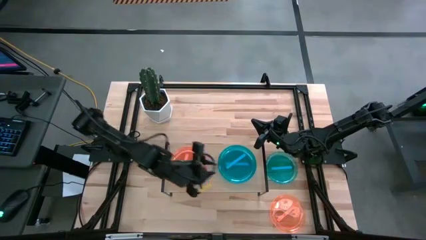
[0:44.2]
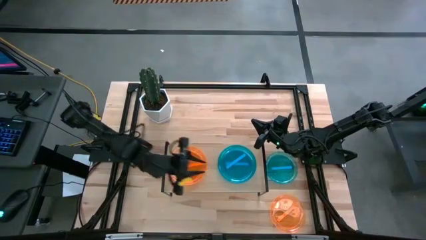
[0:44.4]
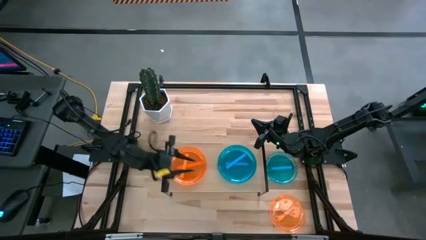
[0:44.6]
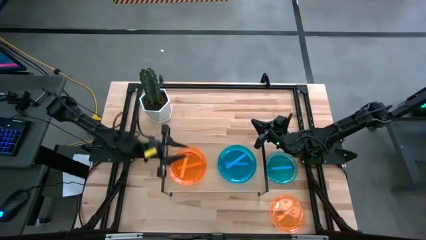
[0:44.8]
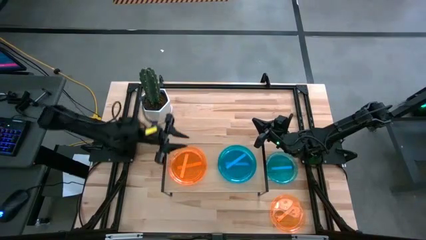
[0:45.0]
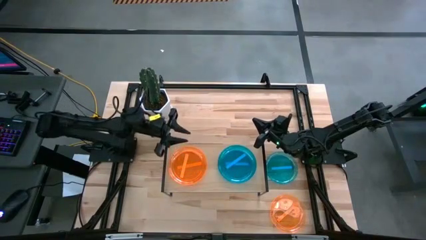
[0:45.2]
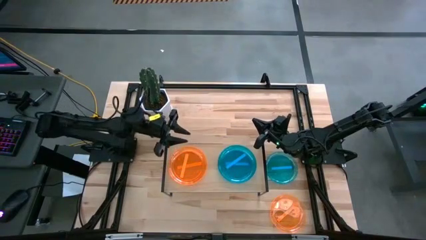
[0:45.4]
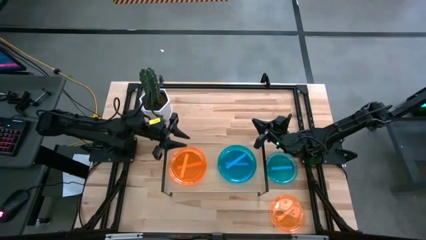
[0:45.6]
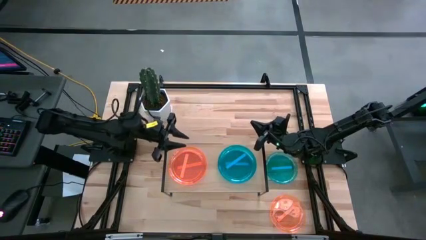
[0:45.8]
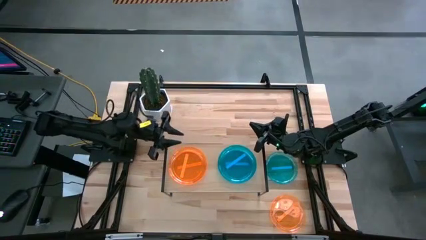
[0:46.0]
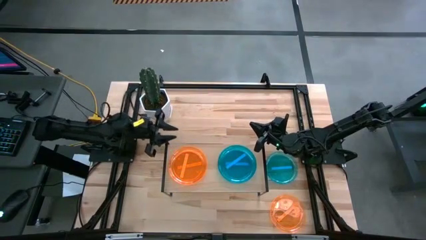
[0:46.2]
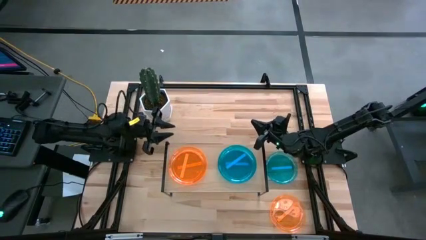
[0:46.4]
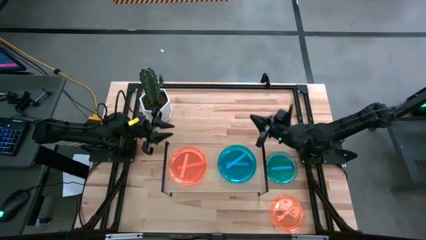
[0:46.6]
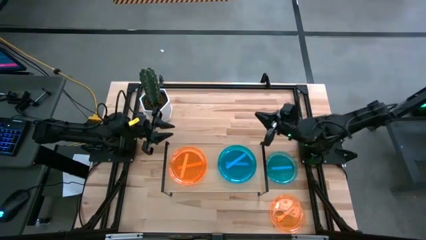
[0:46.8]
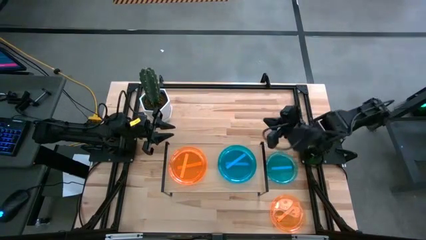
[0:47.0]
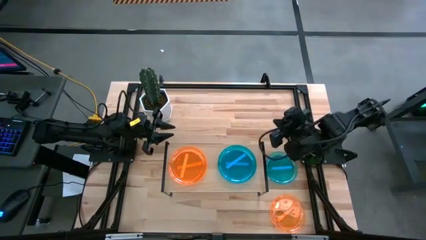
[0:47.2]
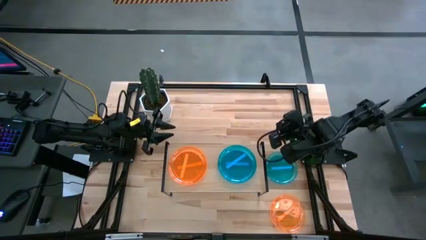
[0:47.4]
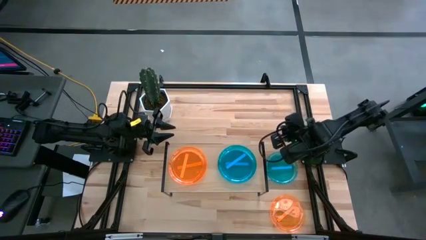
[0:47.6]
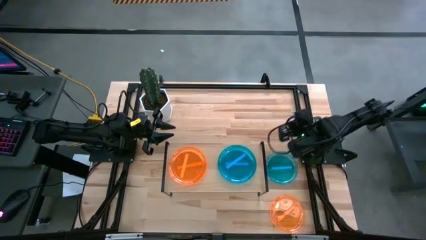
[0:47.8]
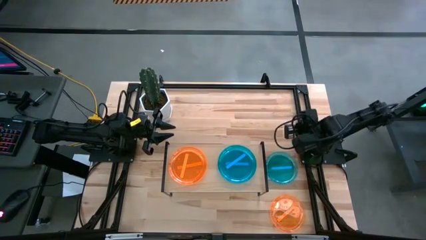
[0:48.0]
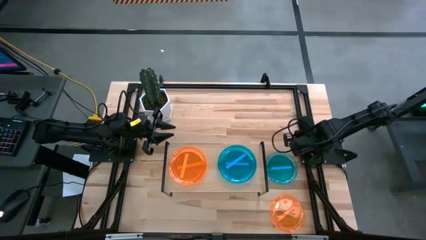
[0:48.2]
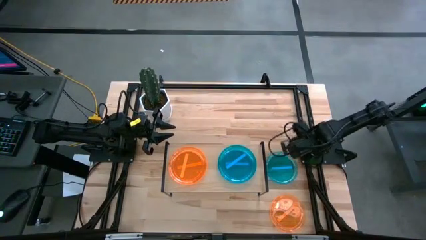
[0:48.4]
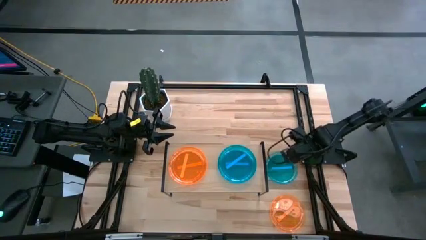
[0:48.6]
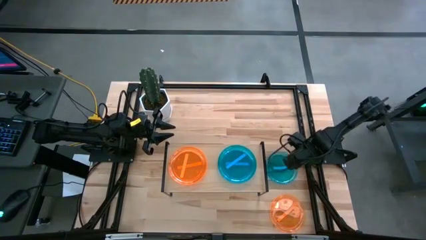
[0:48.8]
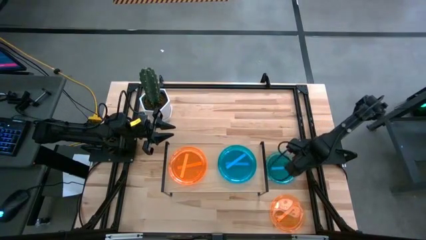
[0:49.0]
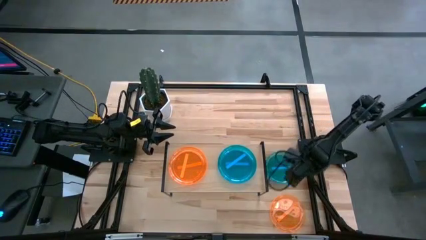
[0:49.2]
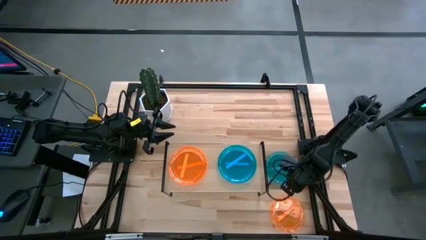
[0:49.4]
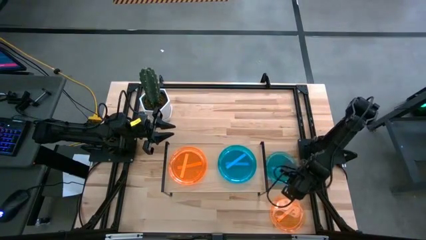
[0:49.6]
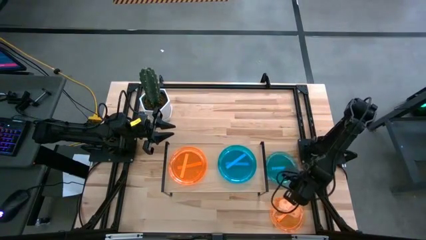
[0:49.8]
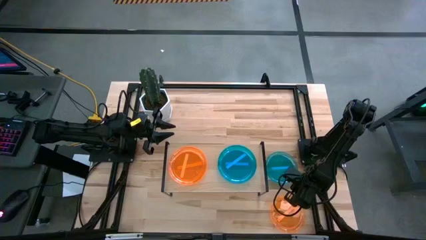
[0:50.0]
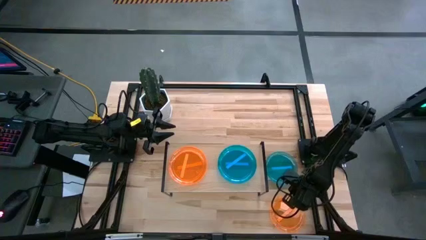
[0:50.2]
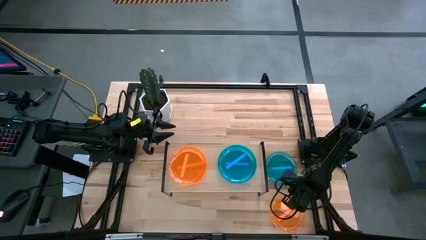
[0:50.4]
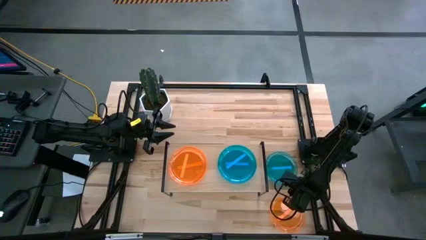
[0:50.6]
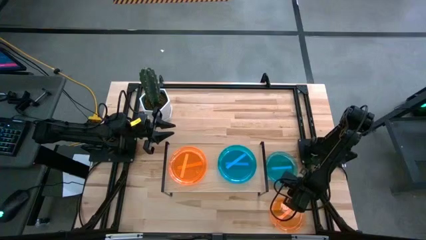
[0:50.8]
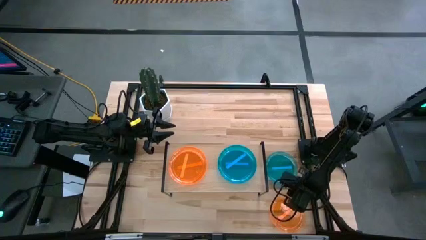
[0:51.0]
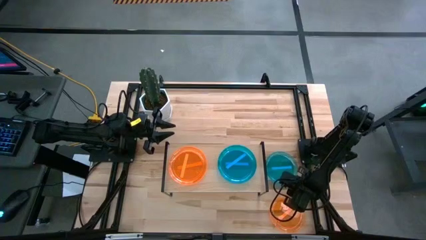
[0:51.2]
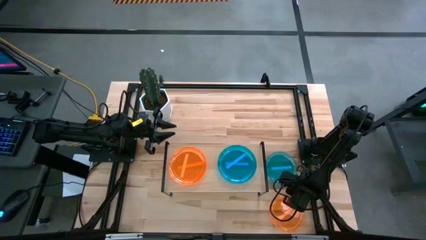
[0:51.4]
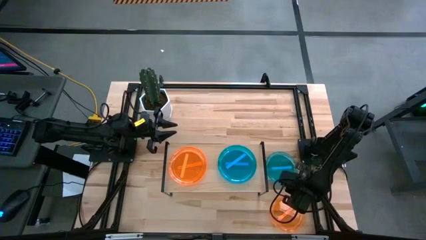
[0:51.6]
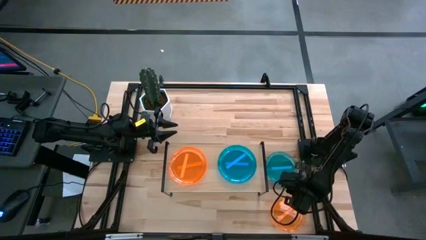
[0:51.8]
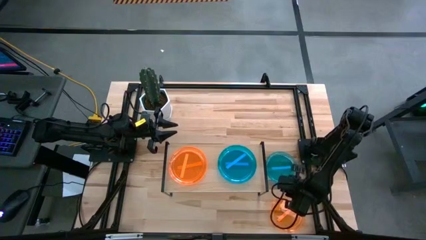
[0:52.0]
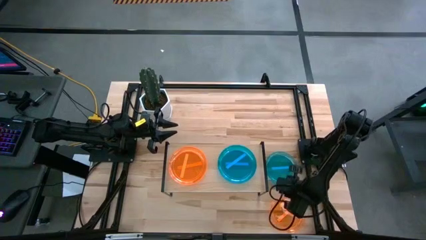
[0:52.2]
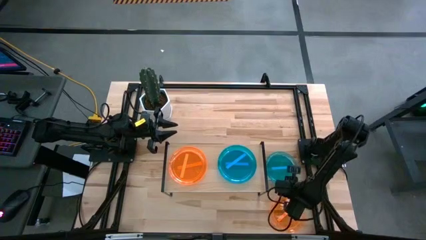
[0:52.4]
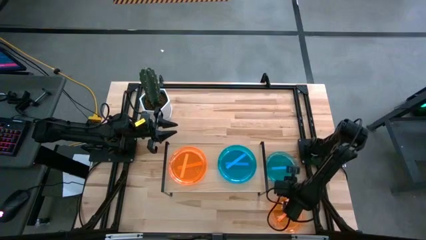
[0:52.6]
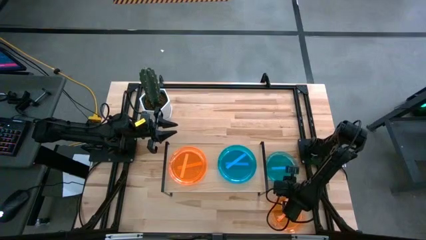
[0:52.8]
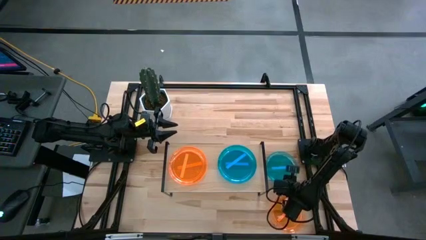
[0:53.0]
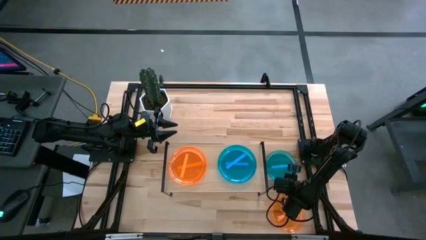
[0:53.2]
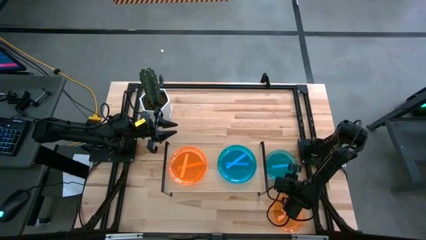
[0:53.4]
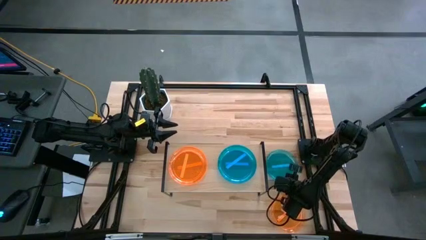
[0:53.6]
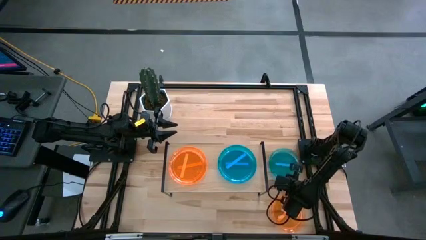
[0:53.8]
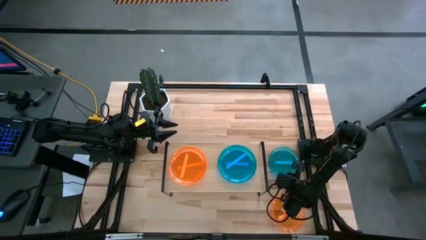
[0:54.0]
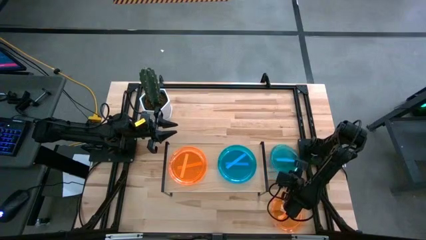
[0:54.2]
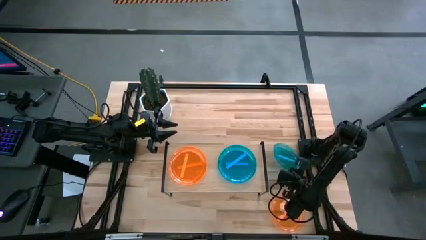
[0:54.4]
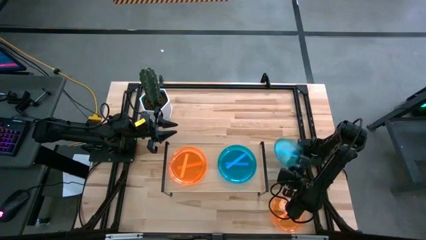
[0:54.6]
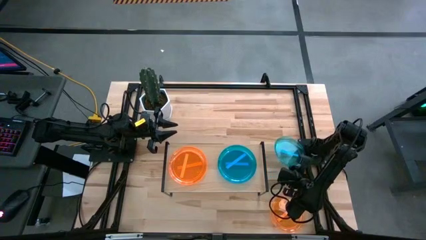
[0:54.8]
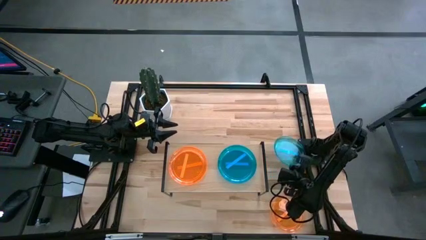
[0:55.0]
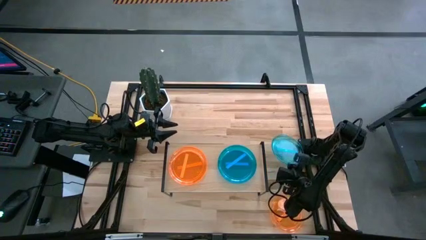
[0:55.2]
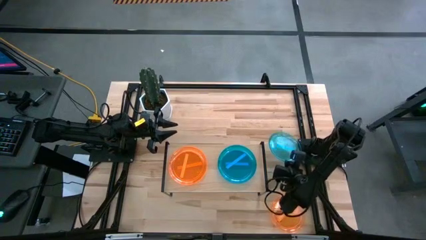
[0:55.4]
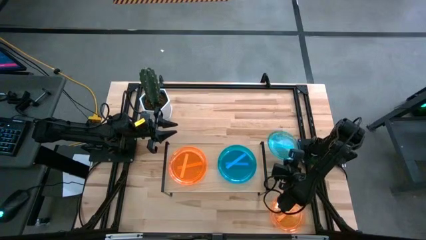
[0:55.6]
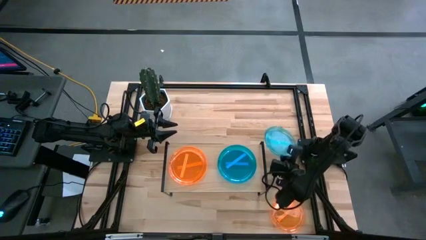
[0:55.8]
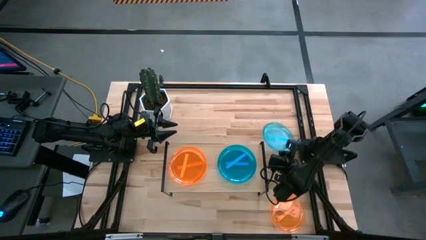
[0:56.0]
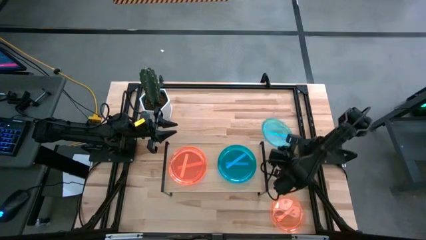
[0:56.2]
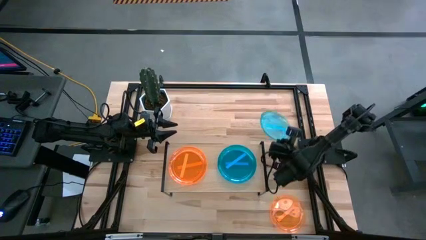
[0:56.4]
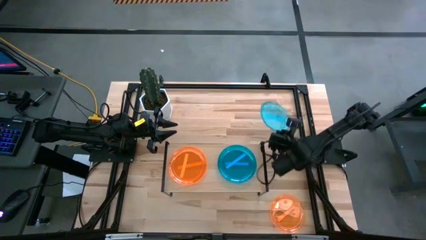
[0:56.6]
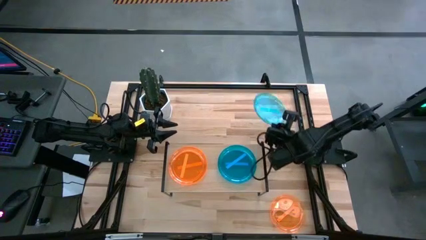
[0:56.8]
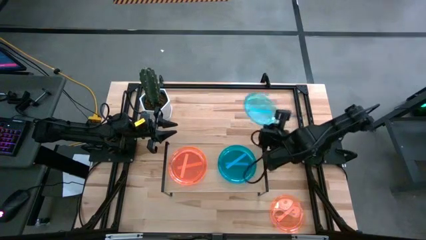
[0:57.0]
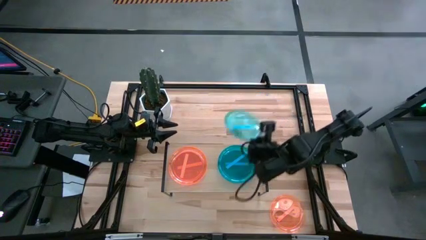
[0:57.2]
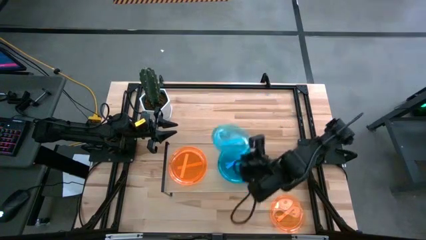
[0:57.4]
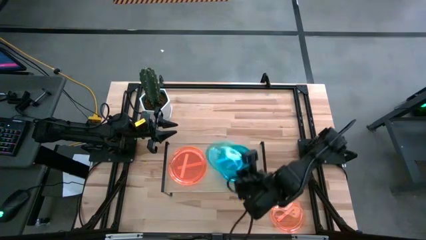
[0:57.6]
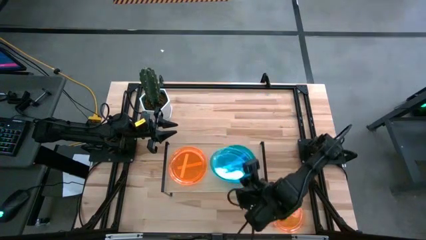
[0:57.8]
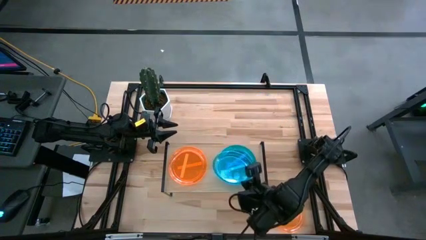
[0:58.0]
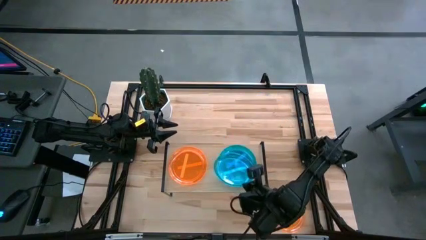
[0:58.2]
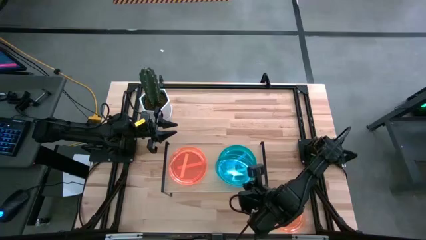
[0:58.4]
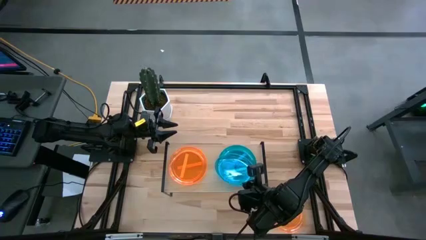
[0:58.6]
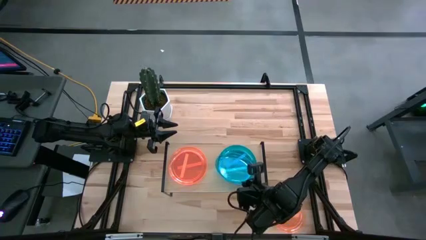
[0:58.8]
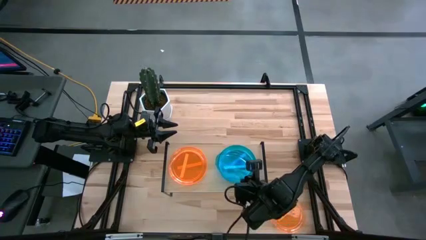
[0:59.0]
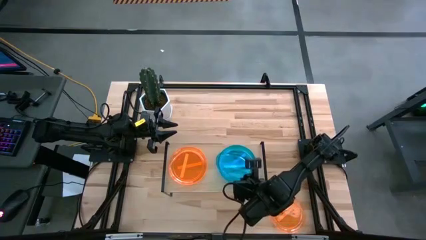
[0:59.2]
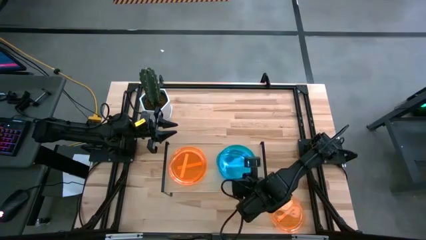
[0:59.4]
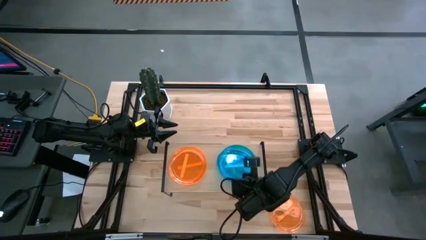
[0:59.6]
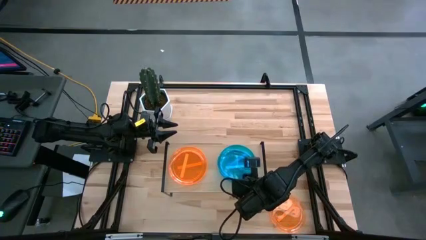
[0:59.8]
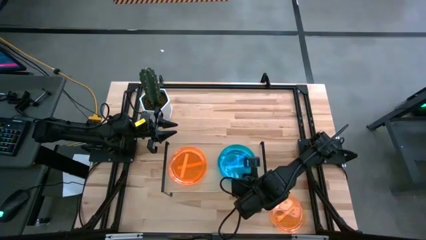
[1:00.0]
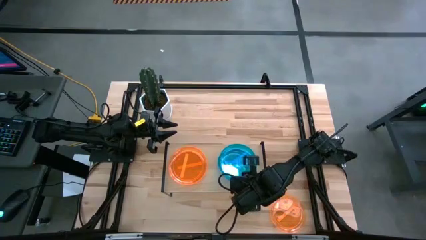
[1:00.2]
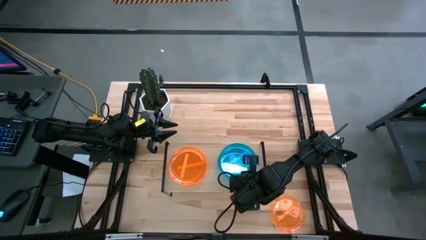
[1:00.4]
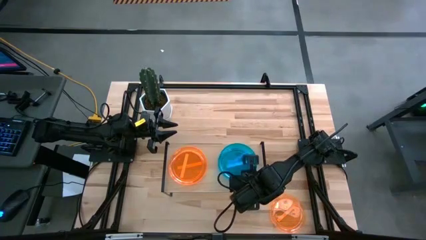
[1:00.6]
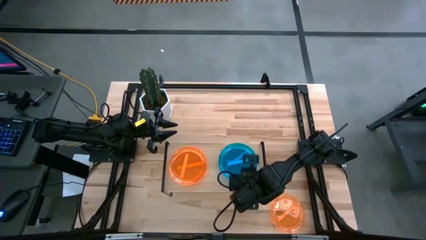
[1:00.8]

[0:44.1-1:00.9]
Task: Place and stack plates onto a shelf
Stack the blue transparent plate on top of the blue transparent plate
